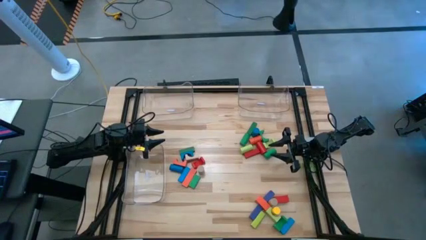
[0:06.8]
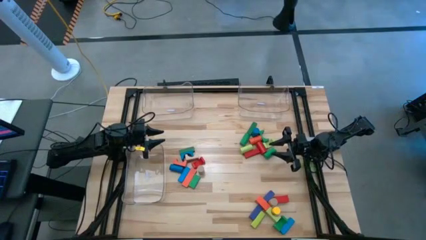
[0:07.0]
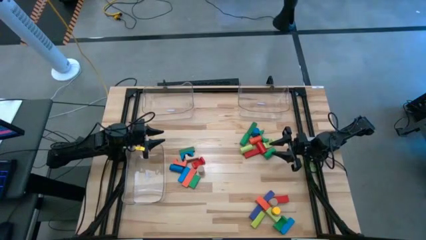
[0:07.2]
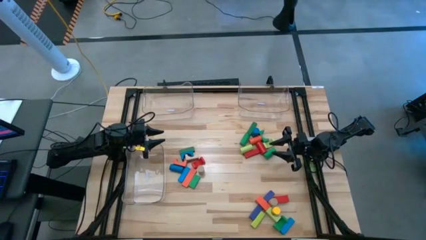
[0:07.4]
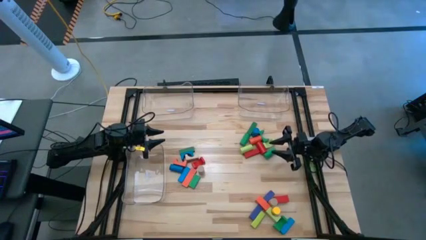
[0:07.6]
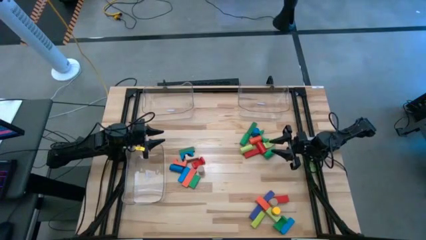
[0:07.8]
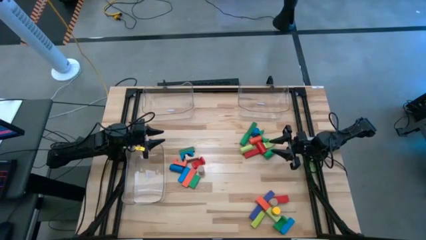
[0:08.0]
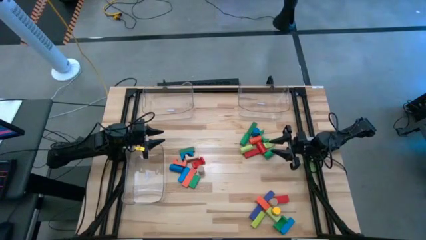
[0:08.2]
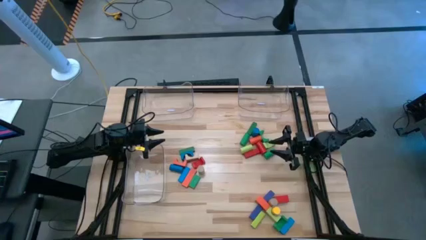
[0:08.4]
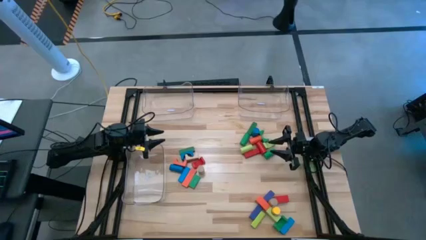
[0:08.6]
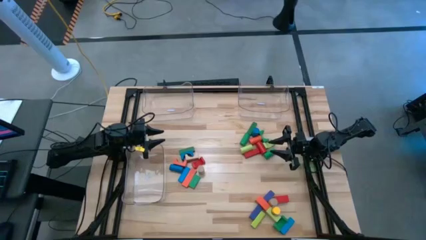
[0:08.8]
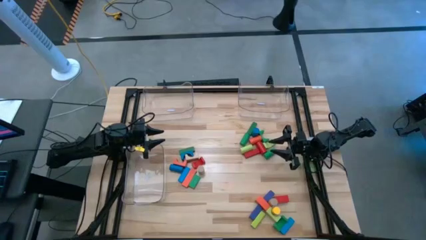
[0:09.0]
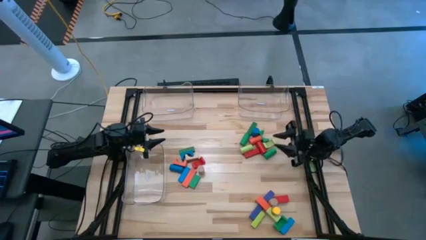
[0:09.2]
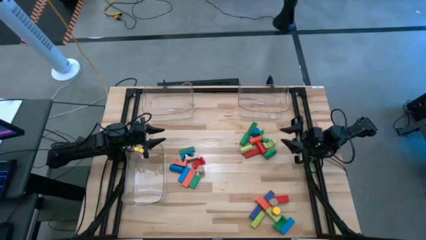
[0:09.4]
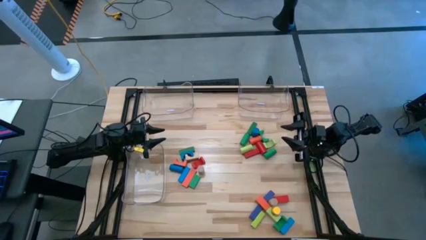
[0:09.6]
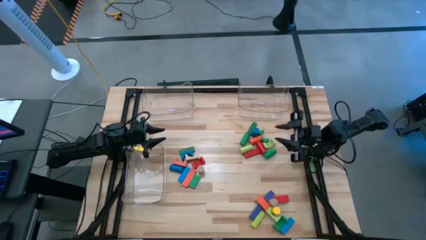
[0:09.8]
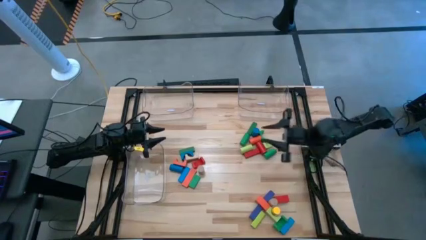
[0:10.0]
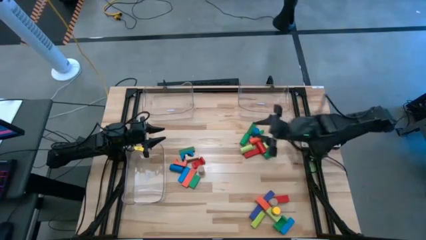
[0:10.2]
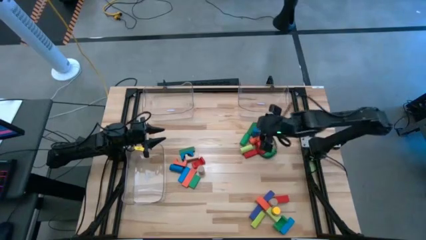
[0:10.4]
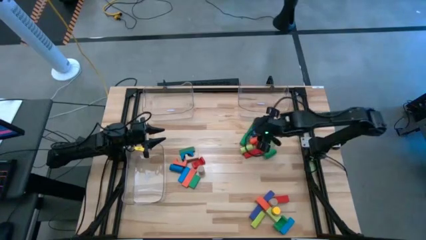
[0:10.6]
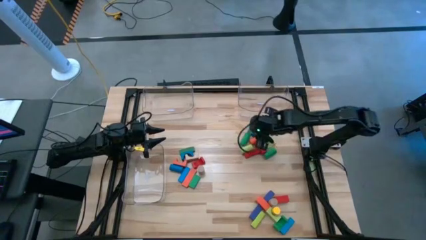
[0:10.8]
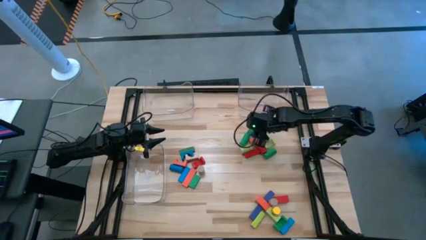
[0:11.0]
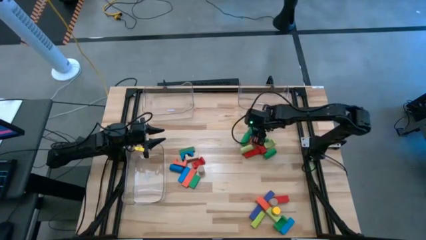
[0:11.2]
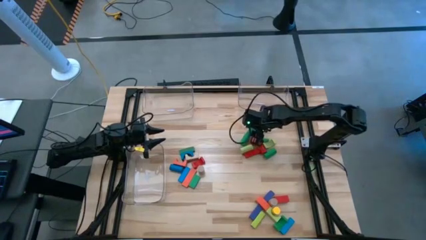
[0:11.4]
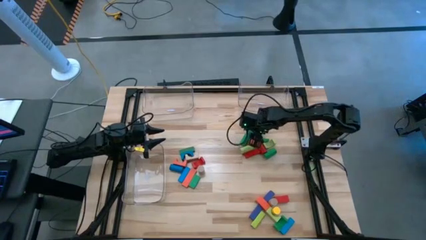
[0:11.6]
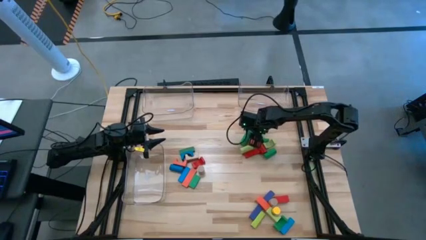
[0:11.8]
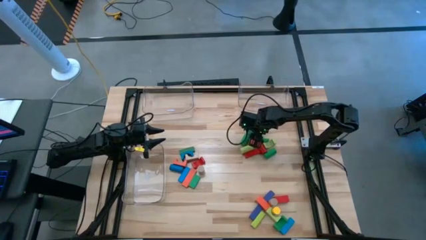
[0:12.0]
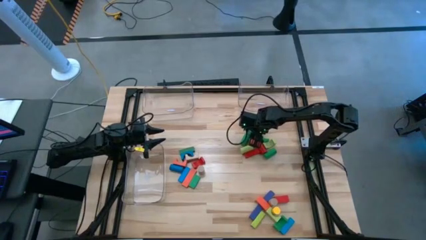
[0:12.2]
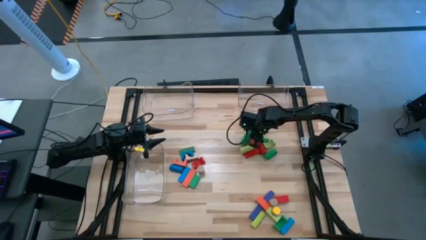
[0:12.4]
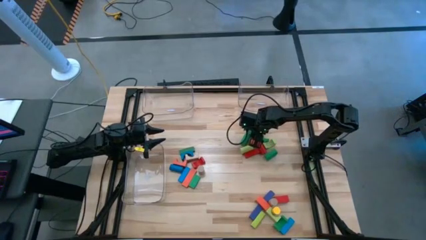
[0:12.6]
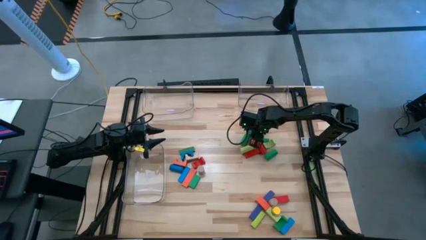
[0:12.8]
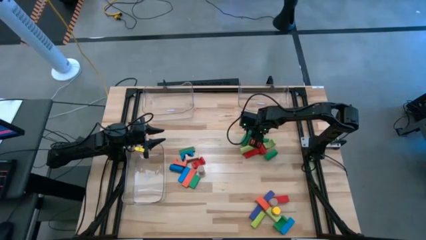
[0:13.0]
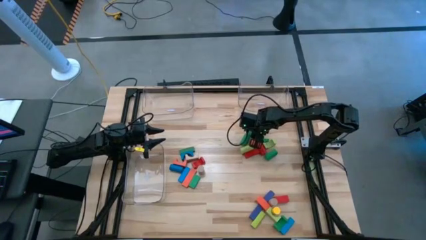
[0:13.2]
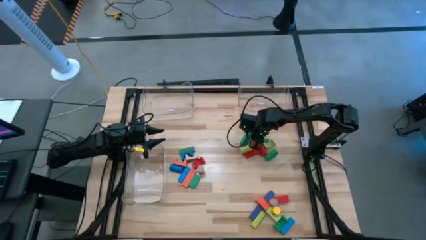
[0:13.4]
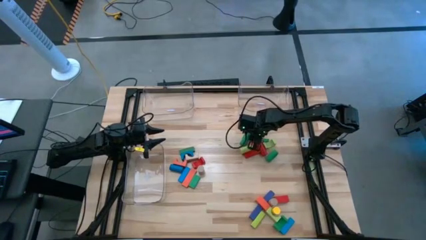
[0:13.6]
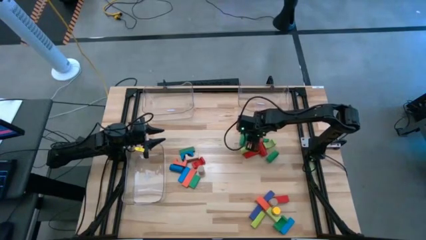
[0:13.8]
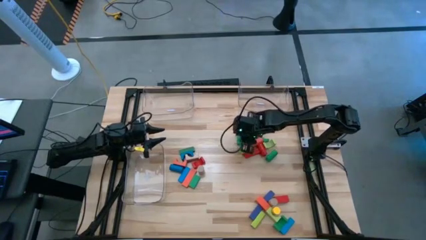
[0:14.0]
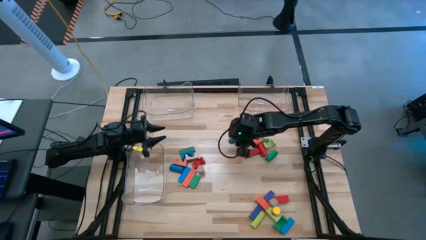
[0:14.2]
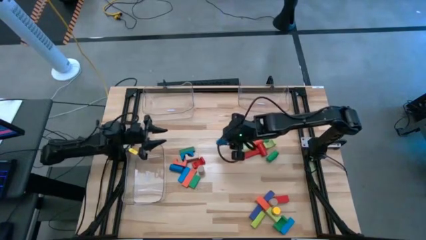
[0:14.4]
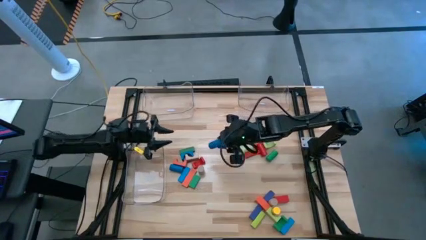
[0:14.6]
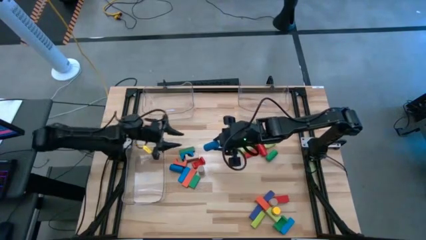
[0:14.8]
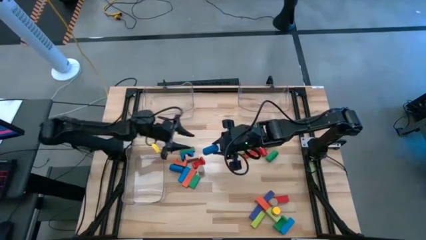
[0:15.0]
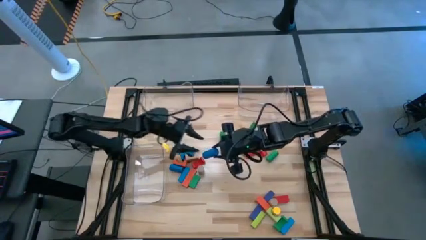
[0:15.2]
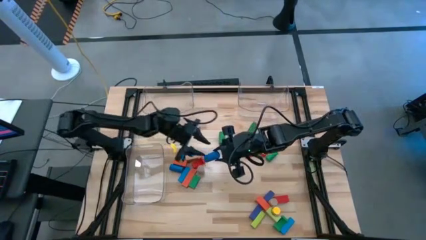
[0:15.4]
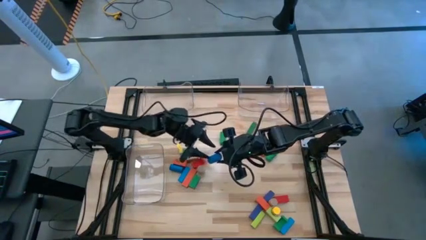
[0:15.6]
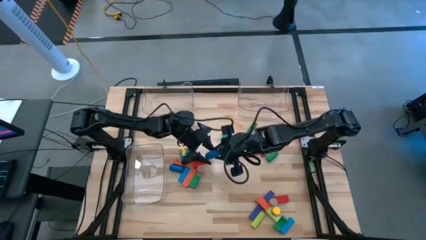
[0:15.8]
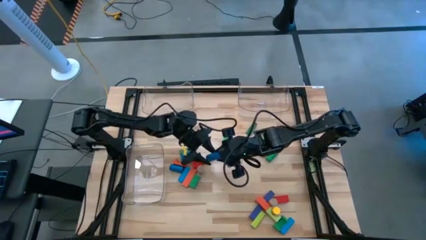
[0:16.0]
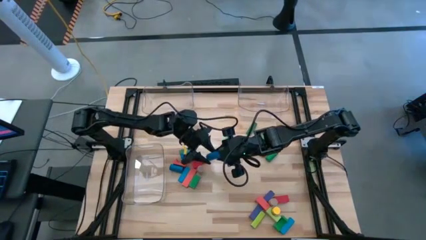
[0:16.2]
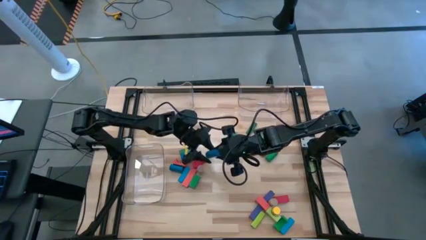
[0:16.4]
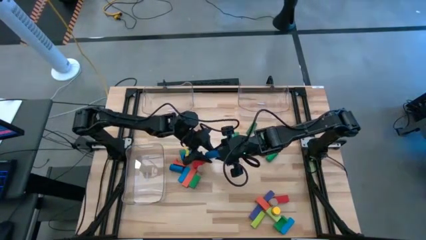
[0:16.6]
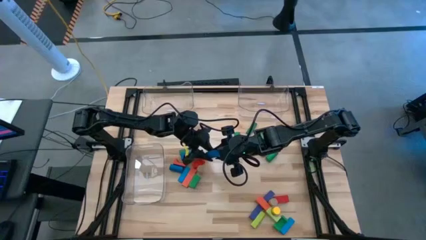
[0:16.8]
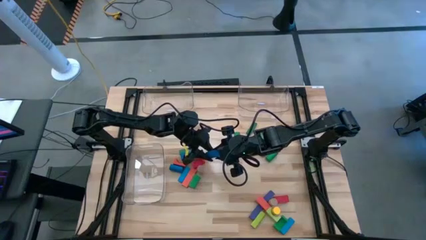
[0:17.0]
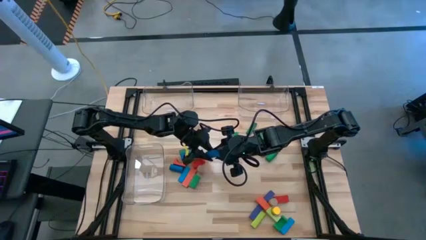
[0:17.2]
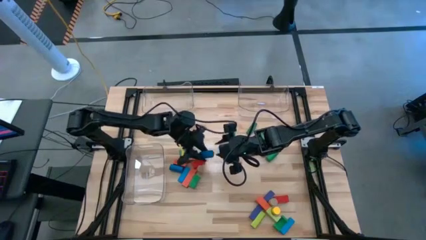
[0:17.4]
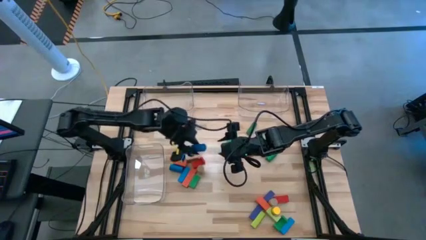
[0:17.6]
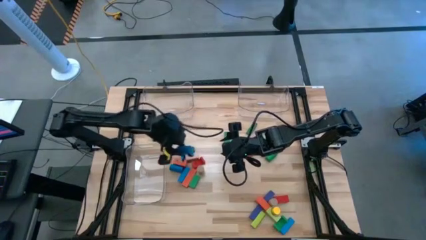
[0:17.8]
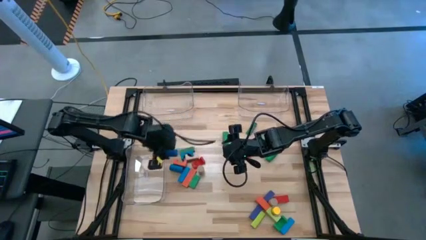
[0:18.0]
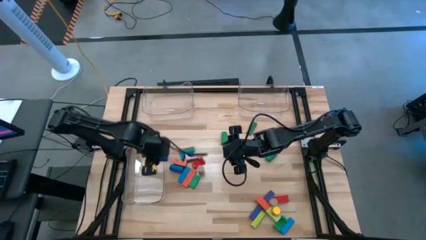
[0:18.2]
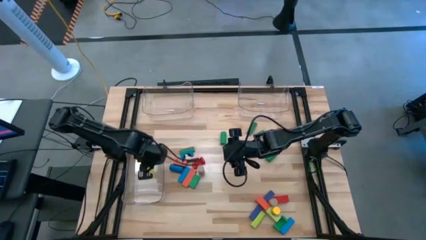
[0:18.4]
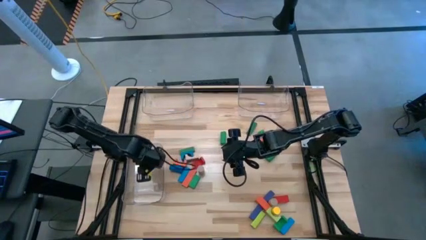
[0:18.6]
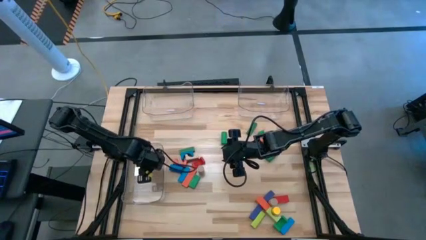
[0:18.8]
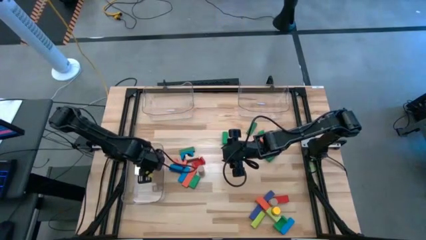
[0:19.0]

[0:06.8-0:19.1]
Task: Sort blocks by size
Put the blue cylindrical block into the bottom left transparent bin

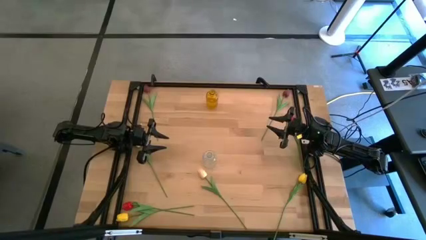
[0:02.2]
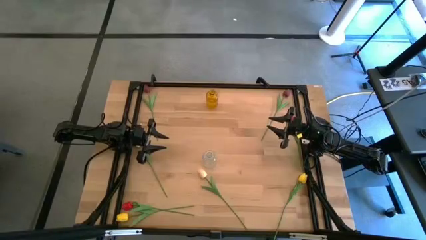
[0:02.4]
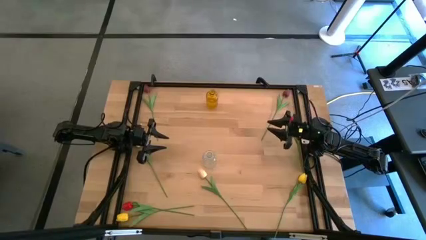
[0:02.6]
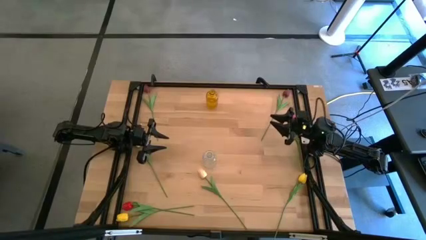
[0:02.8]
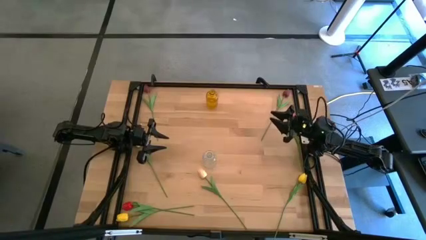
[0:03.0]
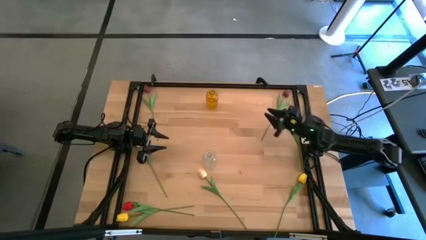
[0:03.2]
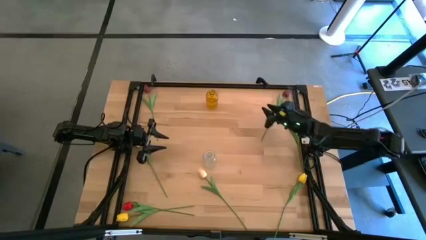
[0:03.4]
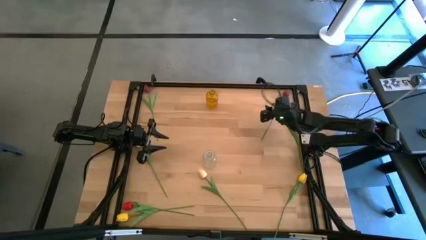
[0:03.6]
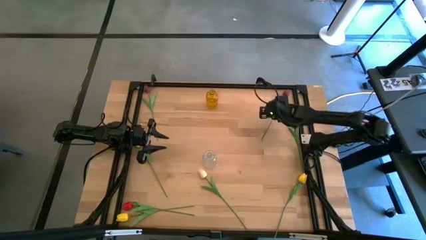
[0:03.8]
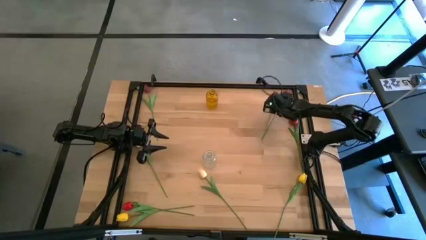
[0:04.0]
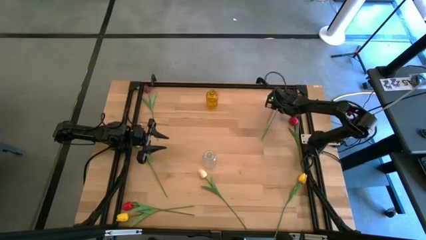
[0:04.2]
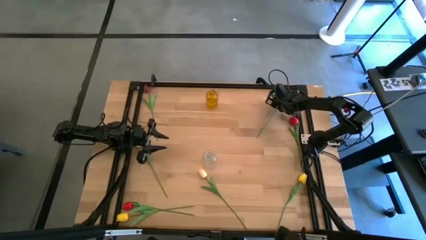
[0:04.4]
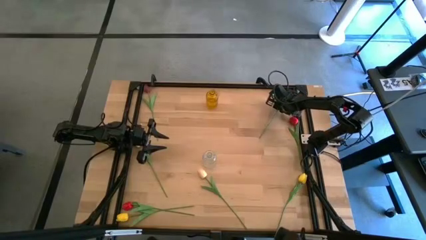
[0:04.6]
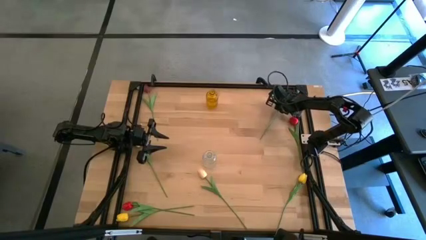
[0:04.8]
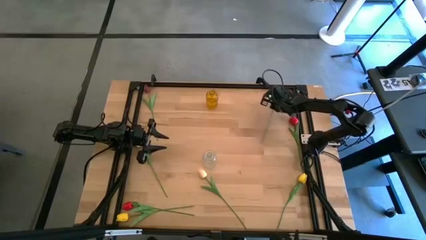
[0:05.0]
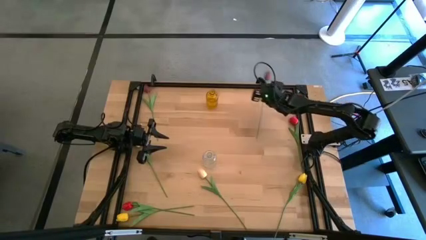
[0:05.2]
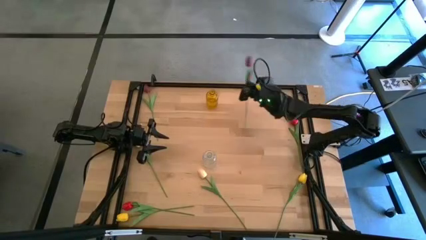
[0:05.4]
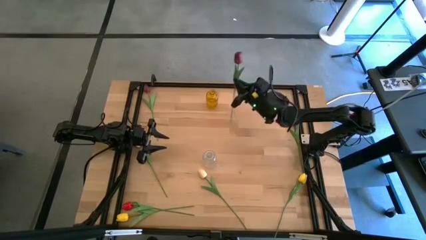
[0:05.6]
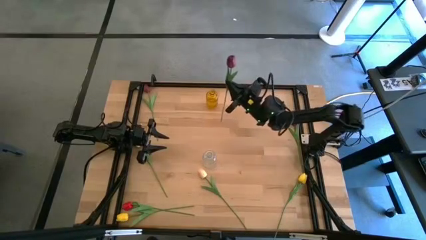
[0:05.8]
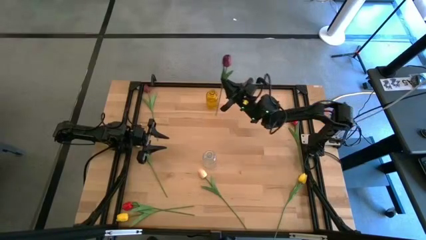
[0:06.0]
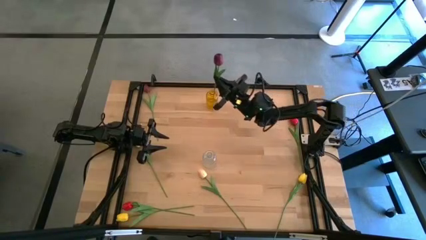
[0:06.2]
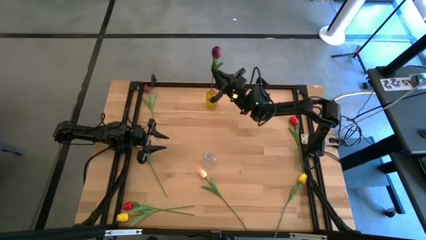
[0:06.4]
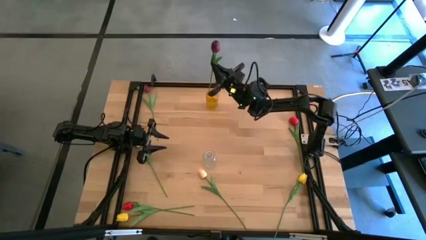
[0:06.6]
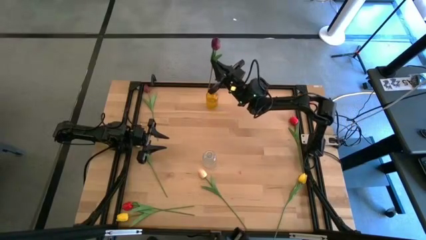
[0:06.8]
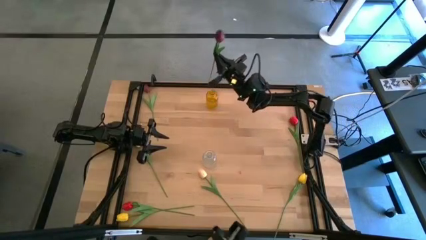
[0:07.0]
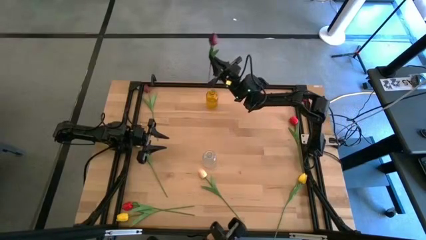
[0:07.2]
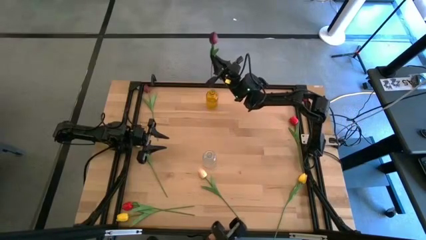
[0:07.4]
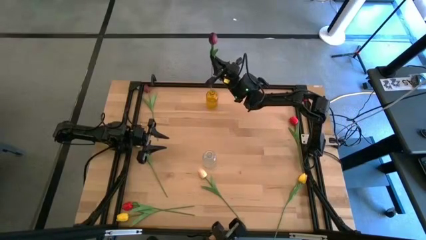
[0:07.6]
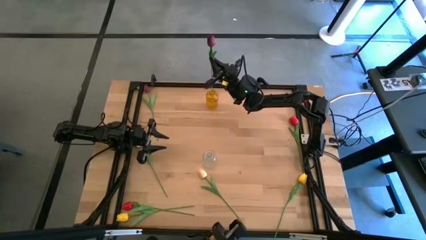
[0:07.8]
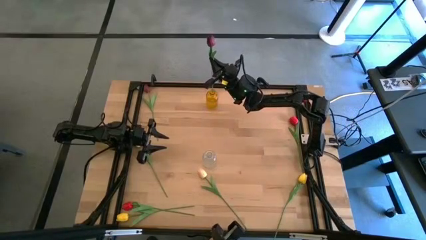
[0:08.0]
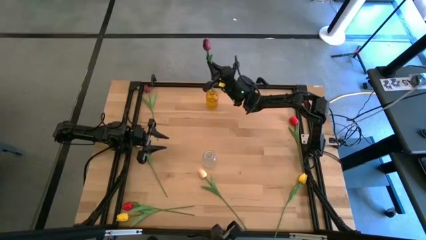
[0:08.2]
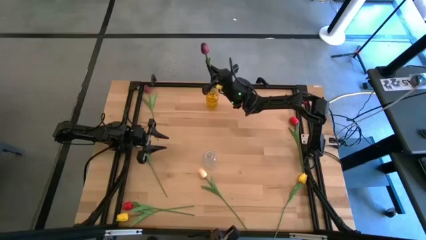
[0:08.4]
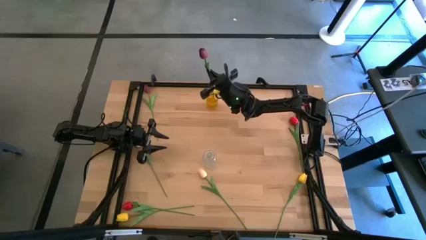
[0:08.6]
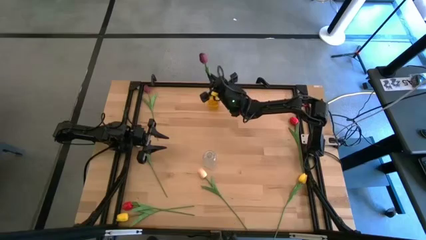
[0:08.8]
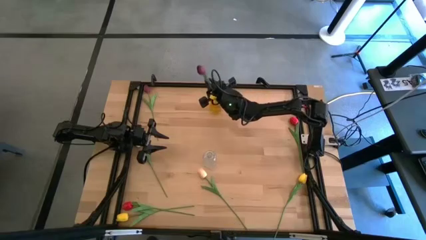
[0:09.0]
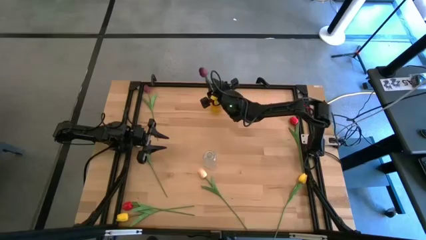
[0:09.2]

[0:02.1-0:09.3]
Task: Sort flowers into vase by color
Put the right dark red flower into the yellow vase
